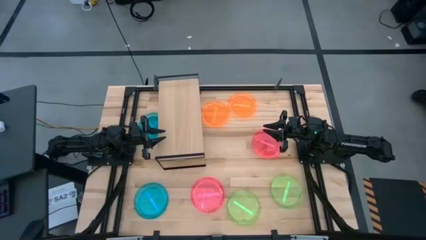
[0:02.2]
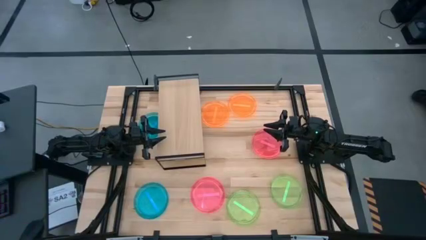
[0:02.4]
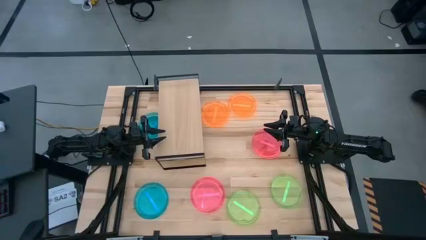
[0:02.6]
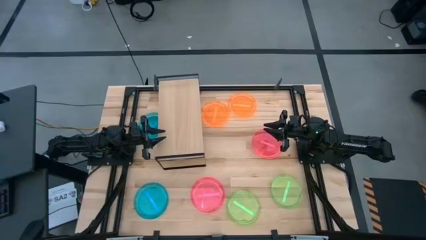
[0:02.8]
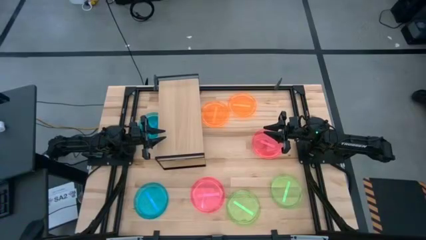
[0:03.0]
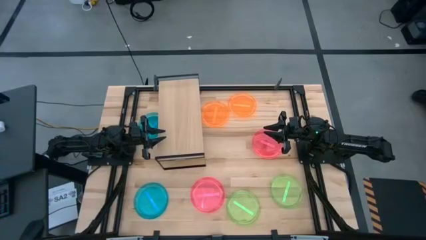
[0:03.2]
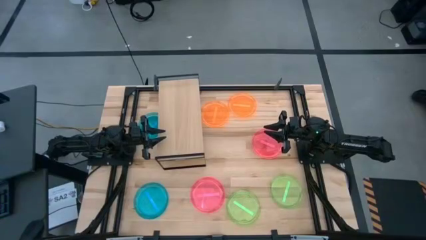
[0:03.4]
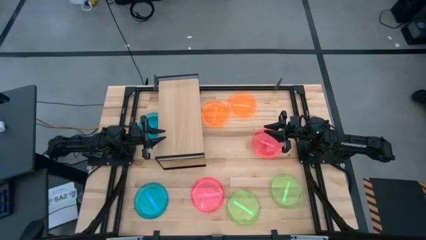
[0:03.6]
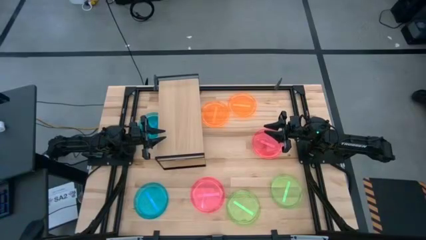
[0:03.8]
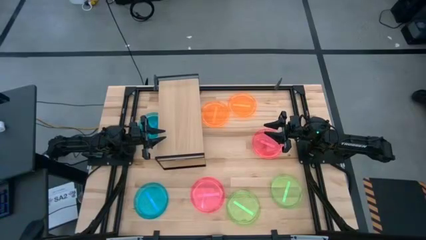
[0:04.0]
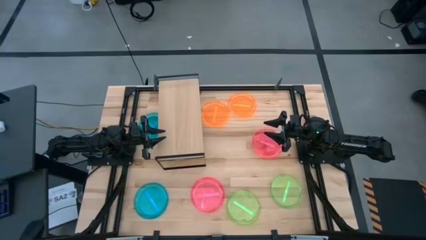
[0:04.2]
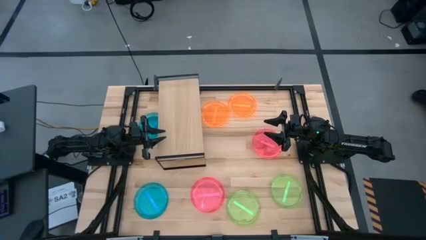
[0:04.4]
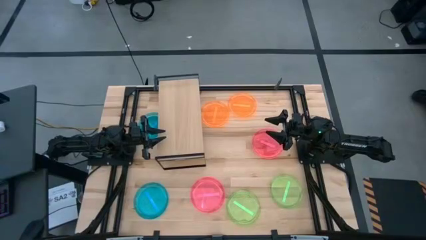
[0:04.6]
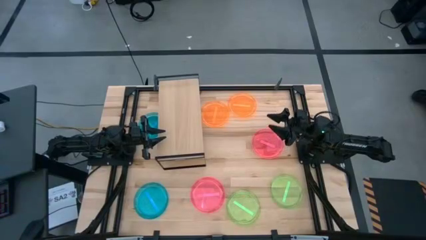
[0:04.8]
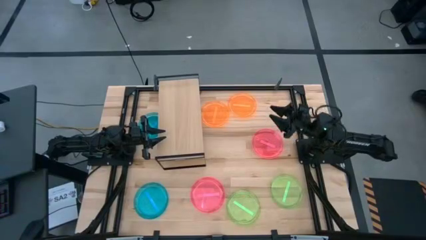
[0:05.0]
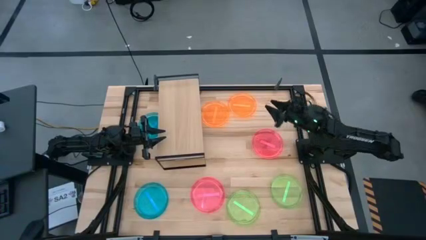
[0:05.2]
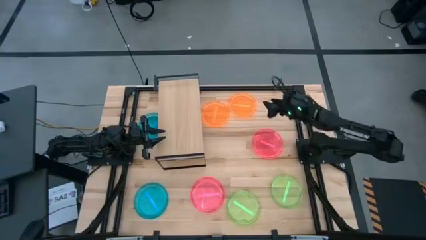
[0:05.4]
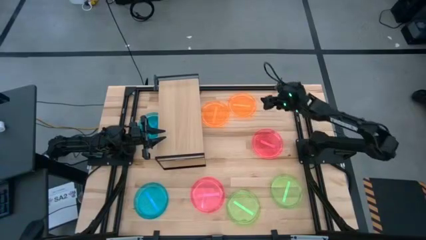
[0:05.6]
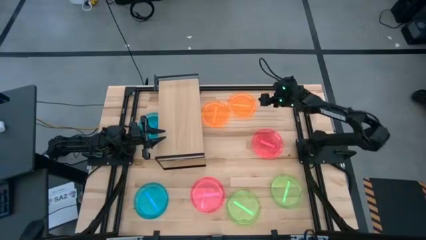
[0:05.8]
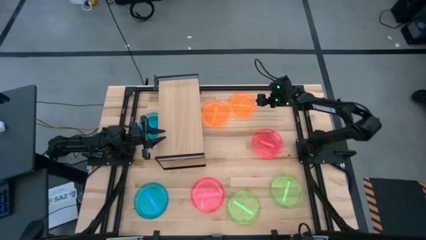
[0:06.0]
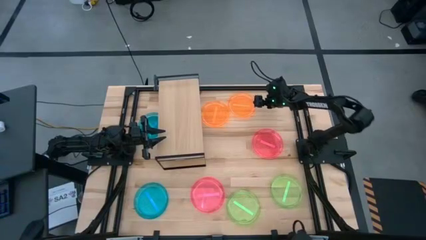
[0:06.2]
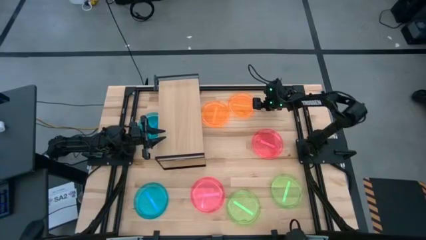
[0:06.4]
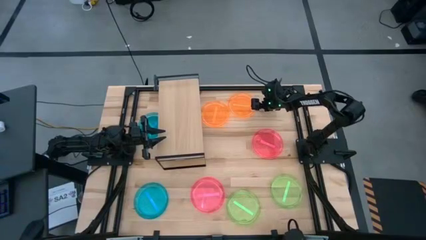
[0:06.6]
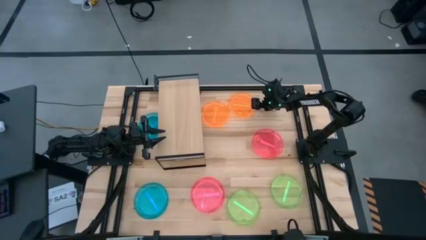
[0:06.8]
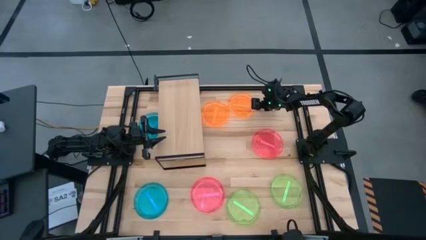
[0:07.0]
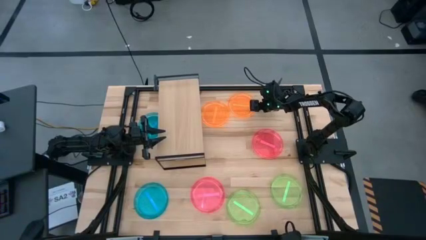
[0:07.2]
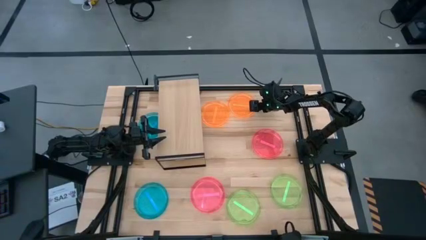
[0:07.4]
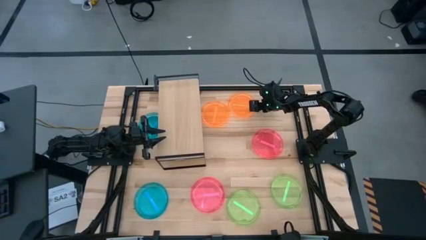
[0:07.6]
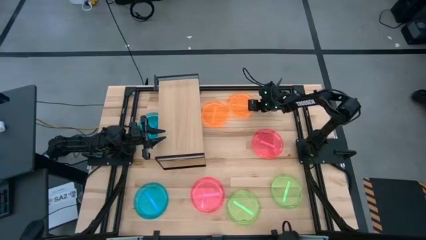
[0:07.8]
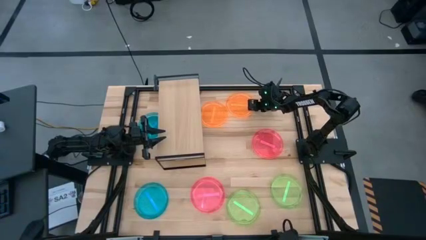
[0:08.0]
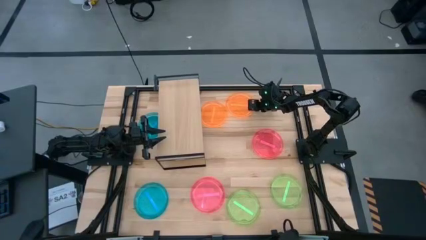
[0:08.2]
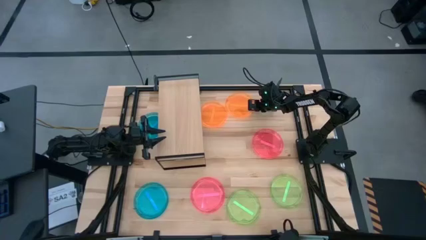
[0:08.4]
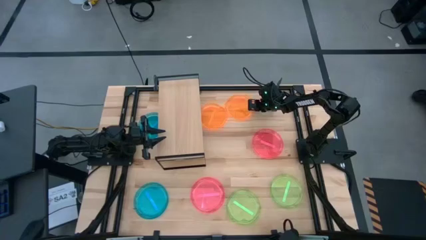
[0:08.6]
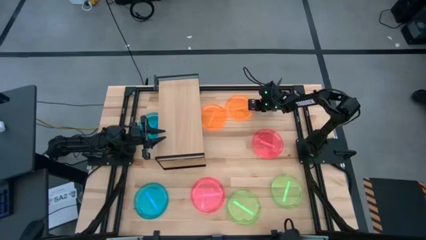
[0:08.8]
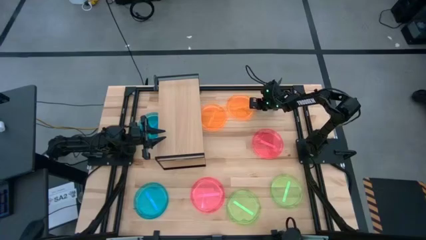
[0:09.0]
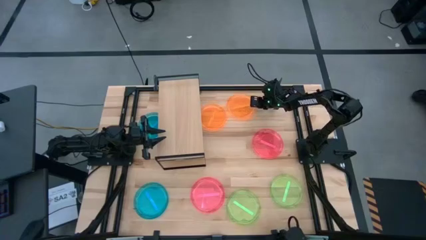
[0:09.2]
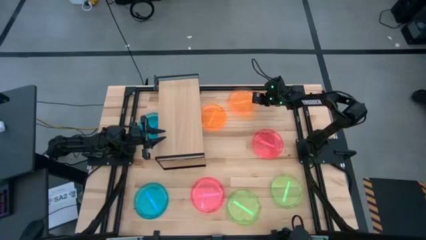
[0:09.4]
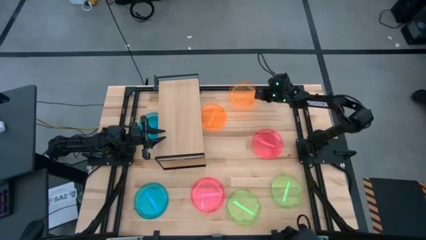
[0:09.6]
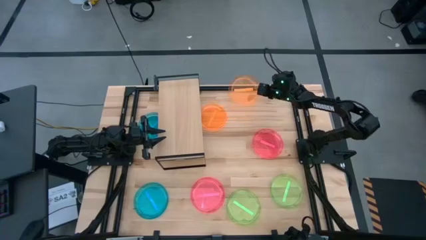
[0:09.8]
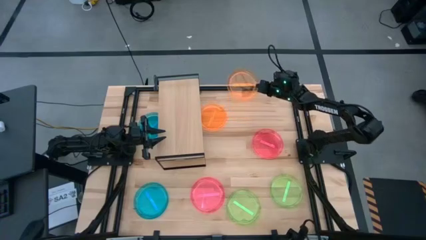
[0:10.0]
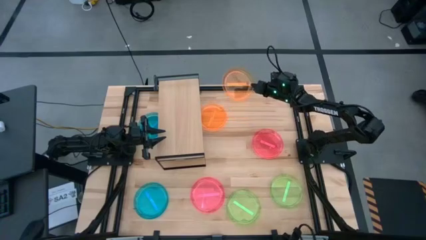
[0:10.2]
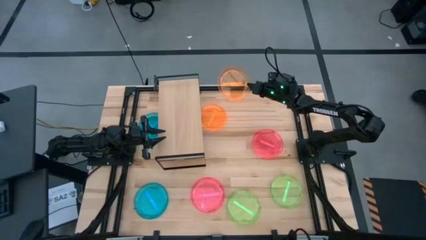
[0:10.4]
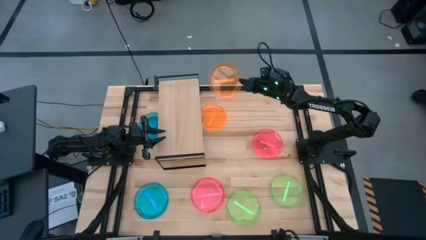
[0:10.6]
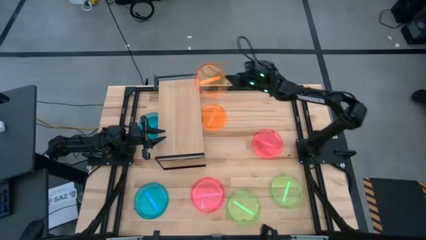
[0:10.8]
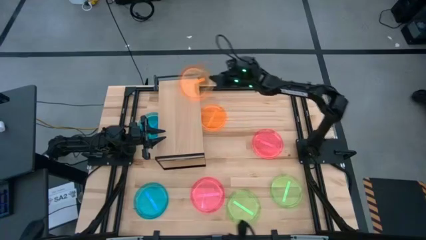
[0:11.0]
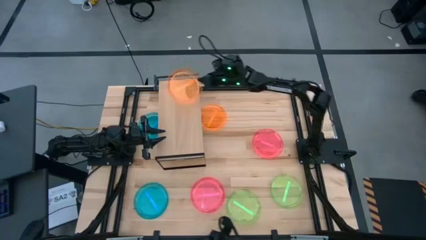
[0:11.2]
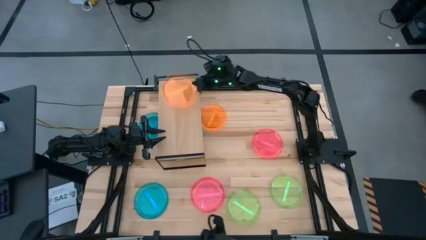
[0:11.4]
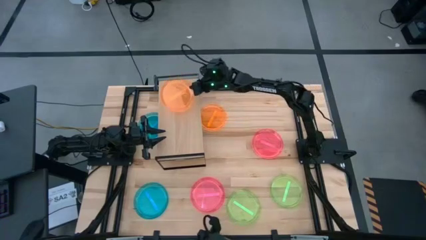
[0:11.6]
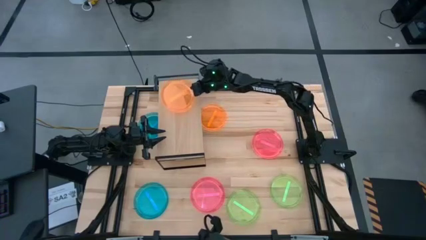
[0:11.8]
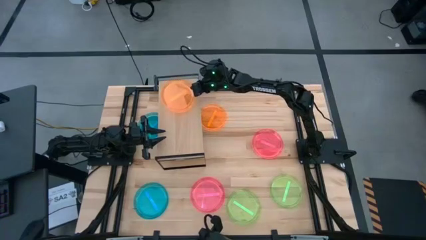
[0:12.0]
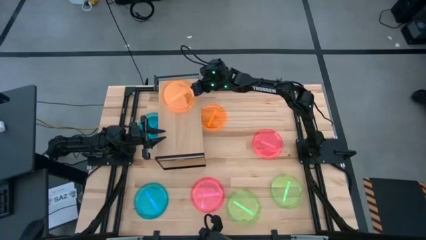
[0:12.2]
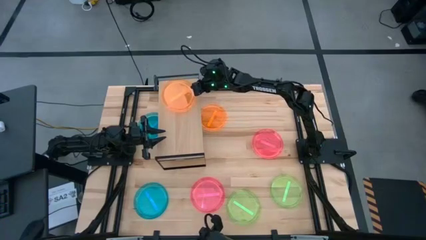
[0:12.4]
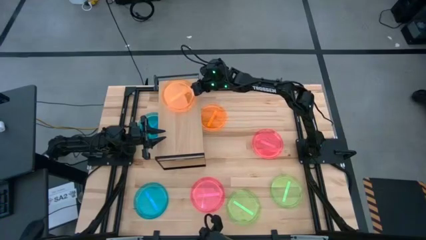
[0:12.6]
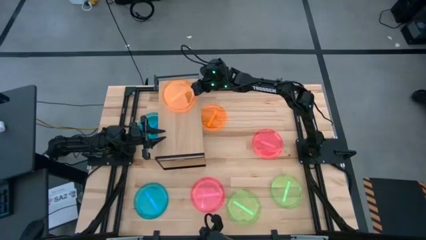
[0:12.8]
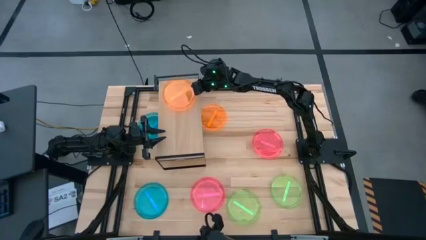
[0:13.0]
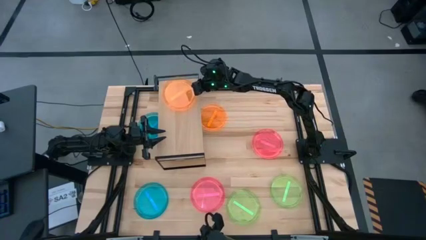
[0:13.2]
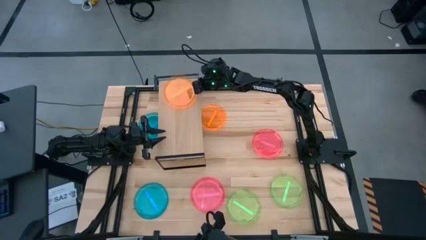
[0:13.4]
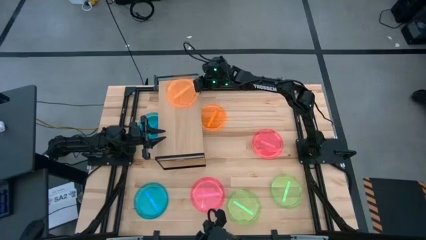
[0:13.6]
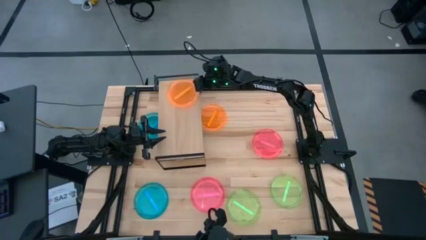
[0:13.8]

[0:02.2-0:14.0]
Task: Place and stack plates onto a shelf
Put the right orange plate on the shelf
